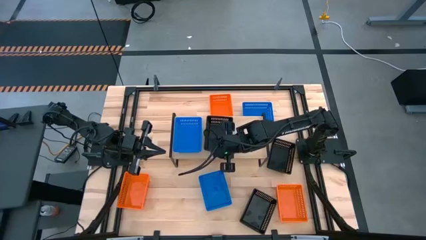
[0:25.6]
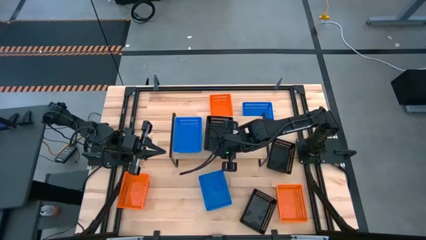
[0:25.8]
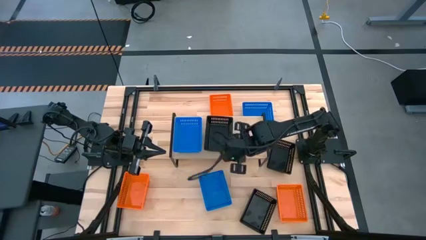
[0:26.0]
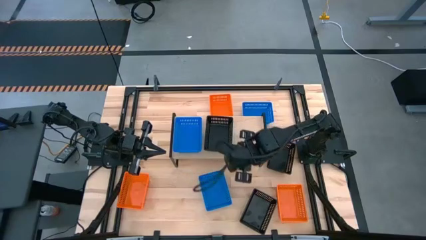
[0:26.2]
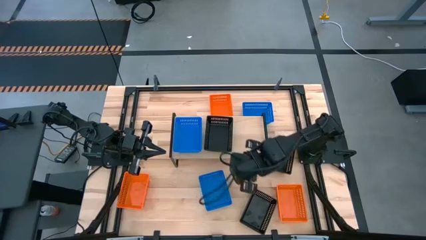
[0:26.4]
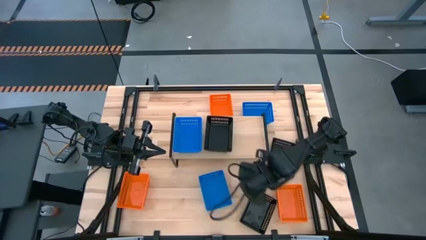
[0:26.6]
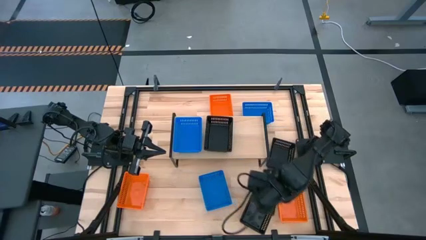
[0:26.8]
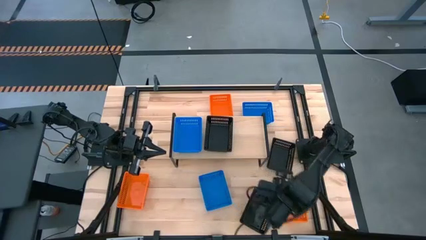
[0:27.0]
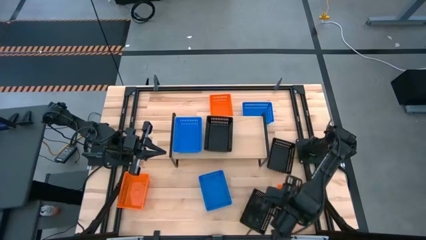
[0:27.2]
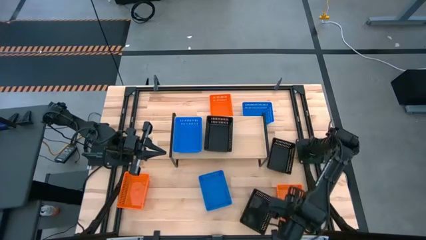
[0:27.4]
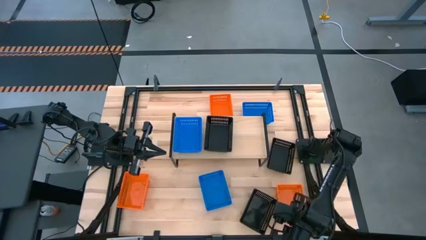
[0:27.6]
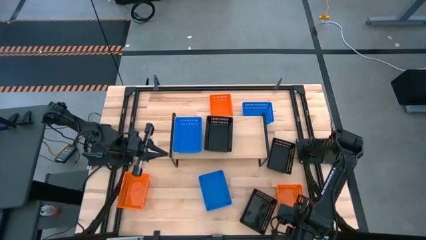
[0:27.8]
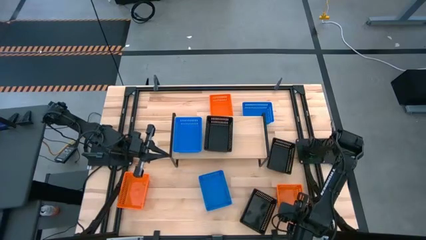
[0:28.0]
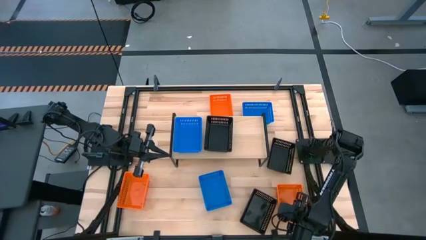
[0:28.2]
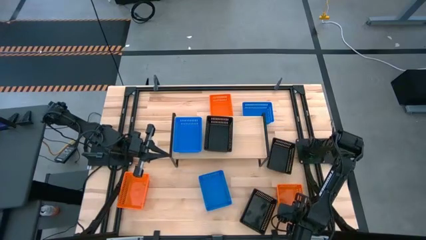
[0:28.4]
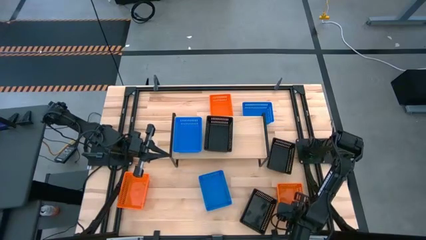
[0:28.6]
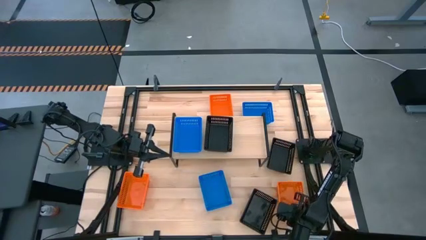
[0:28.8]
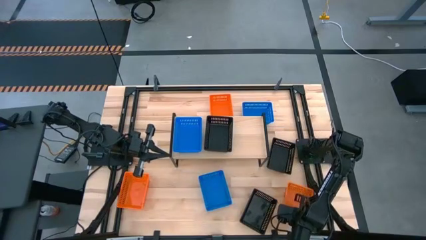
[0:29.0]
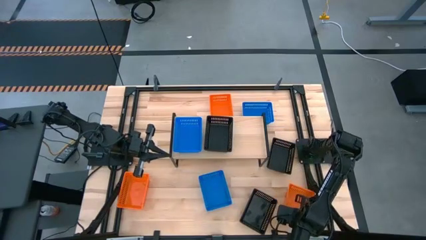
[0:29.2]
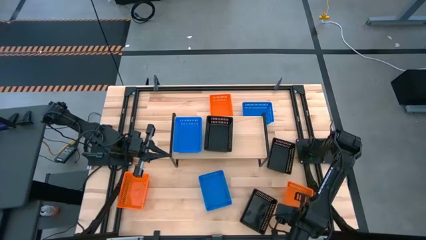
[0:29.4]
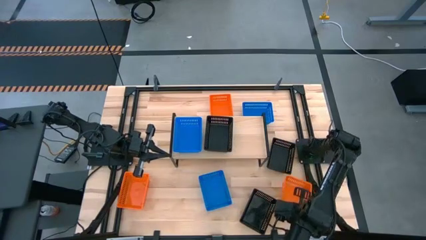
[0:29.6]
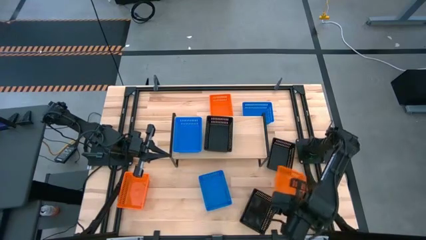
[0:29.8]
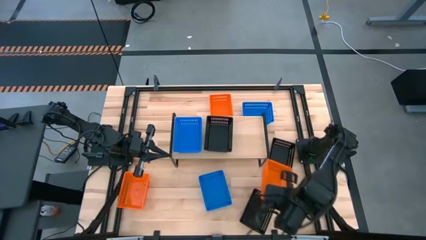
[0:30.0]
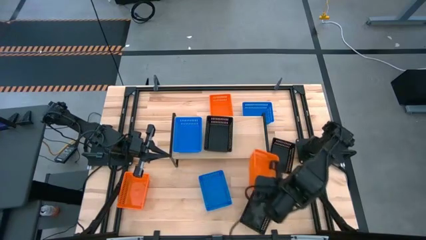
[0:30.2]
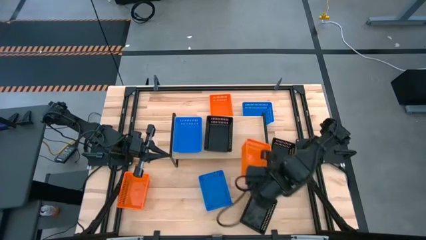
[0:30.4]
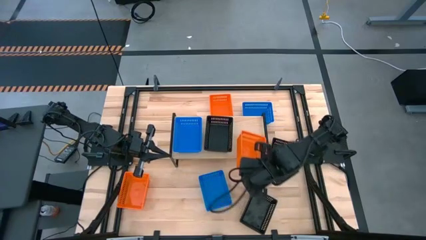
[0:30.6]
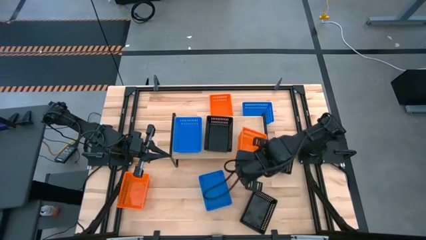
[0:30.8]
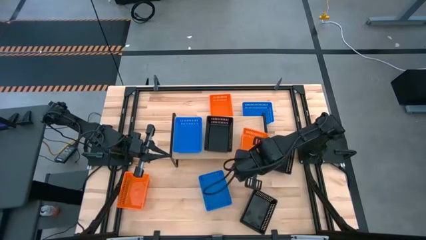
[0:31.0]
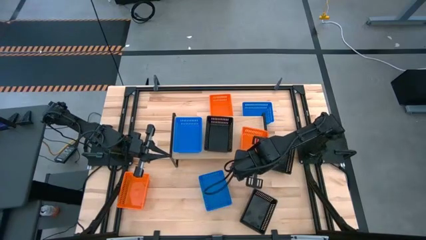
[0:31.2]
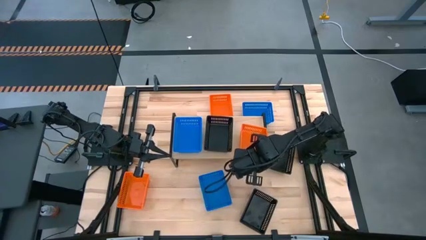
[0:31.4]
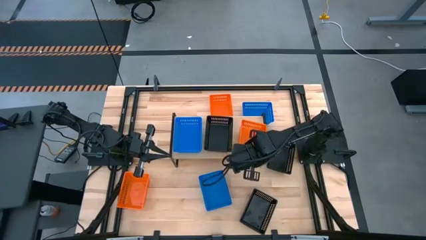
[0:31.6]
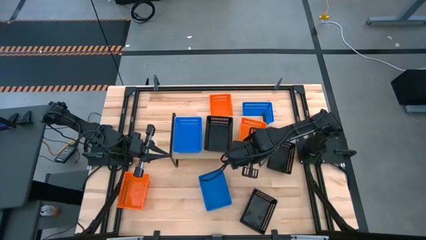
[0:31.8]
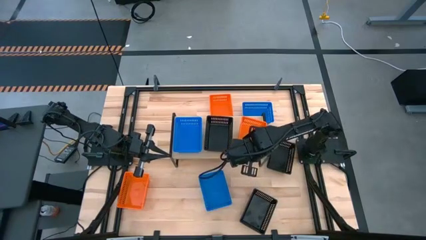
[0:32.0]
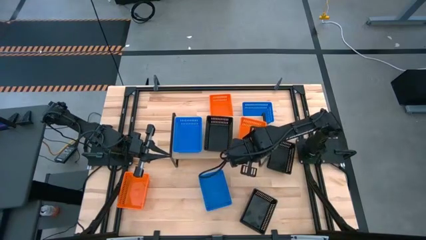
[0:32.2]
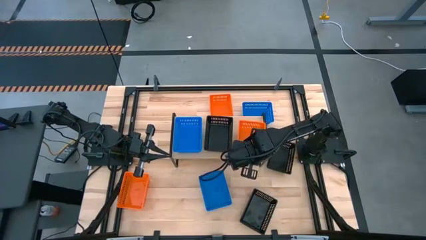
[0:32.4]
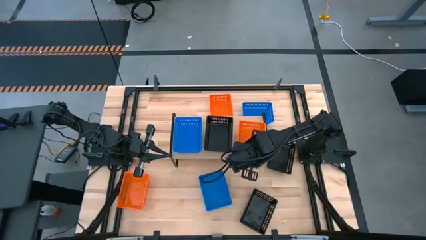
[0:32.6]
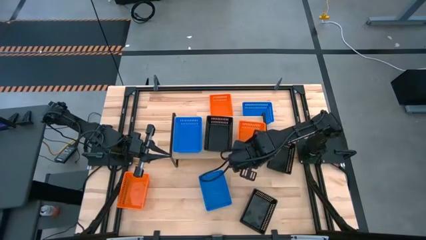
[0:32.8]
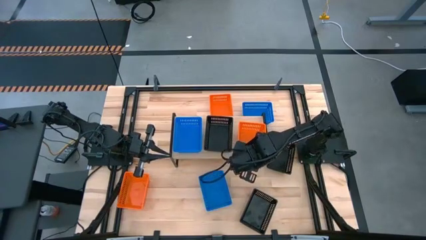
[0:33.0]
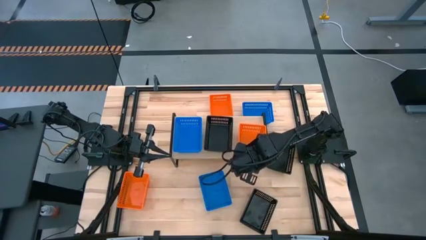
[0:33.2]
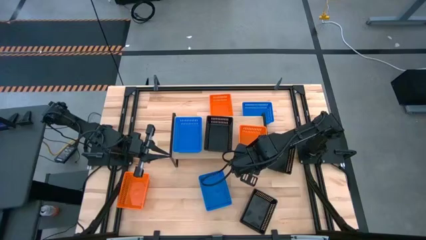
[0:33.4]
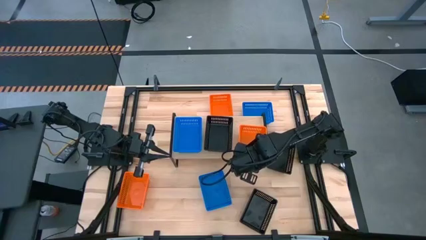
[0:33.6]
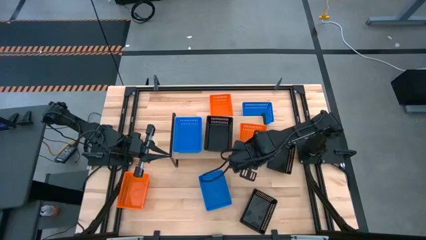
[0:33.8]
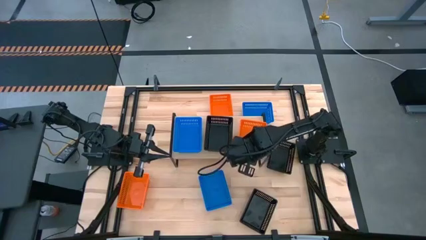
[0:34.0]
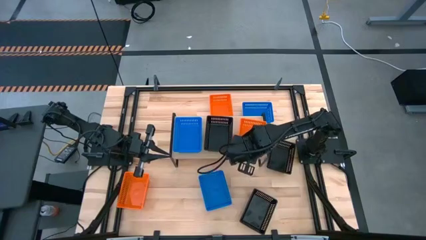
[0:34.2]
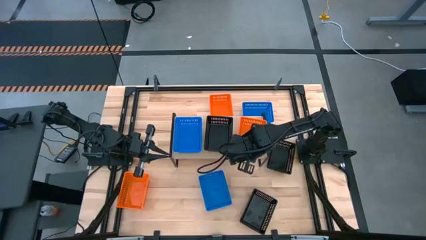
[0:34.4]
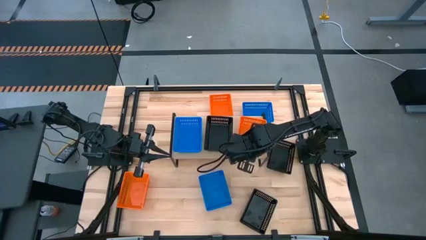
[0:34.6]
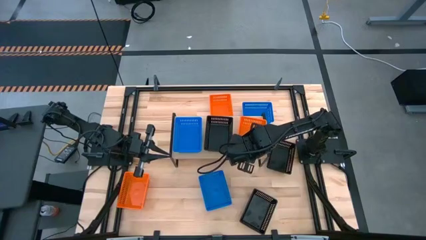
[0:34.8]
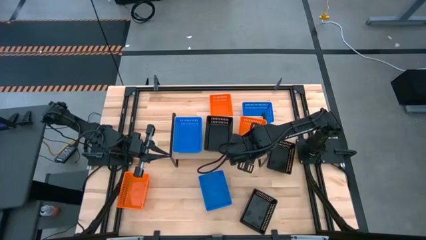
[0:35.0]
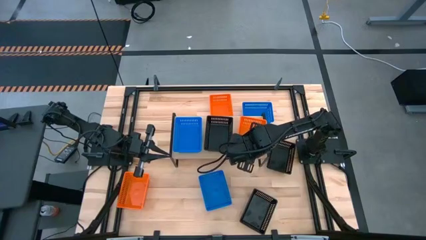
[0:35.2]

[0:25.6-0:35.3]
Task: Stack baskets on shelf by color
Put the bottom right orange basket on the shelf
